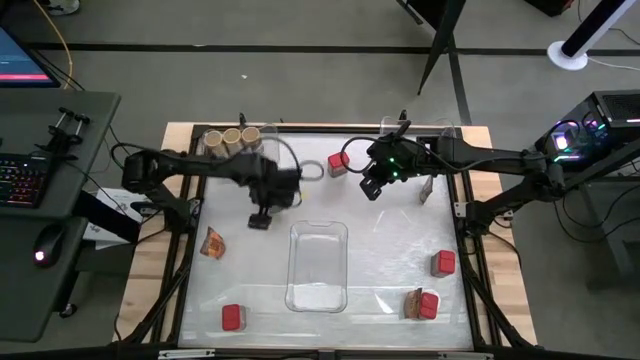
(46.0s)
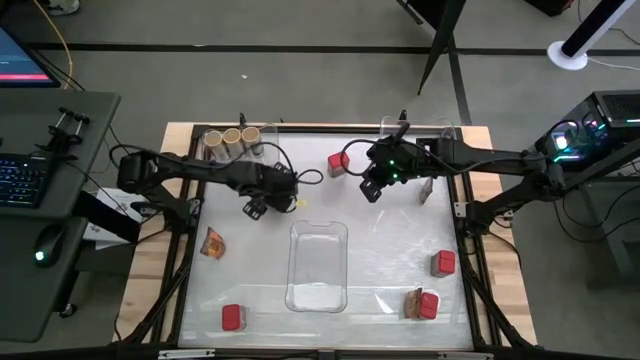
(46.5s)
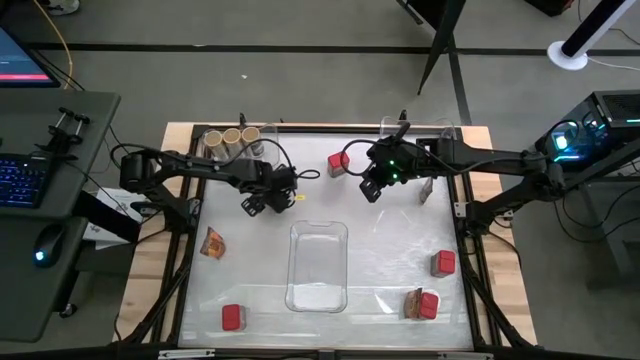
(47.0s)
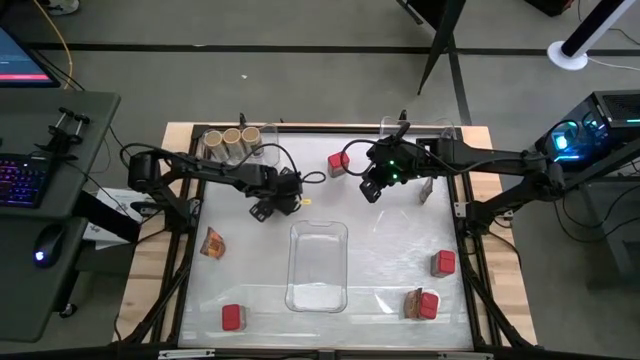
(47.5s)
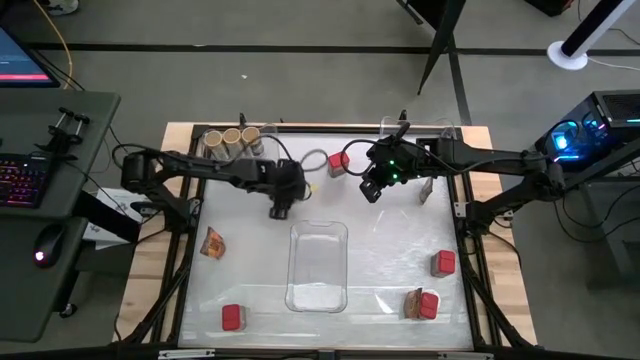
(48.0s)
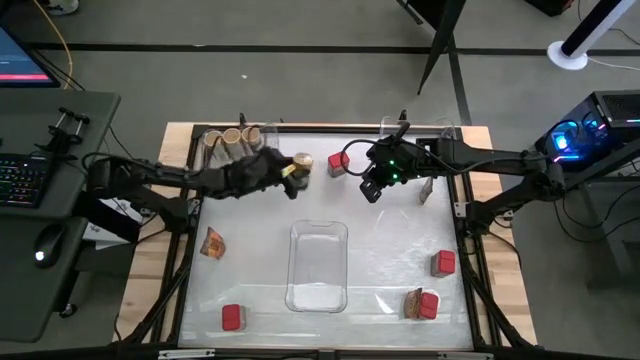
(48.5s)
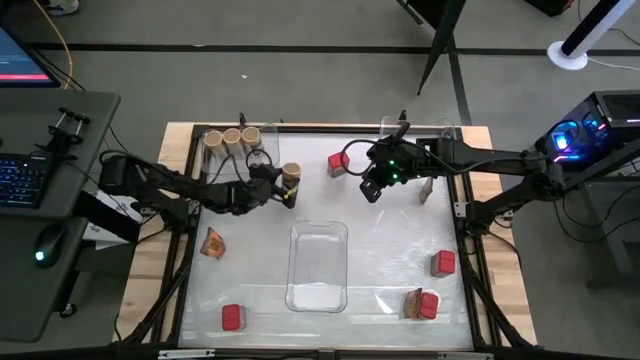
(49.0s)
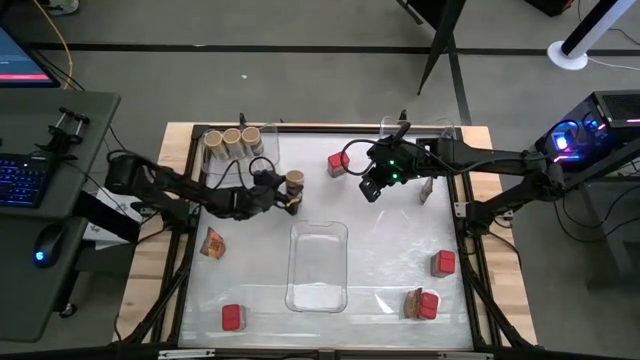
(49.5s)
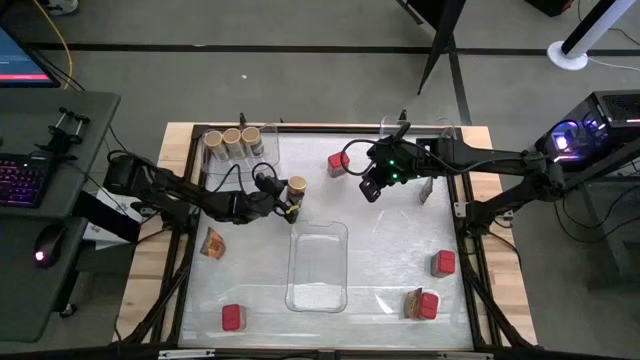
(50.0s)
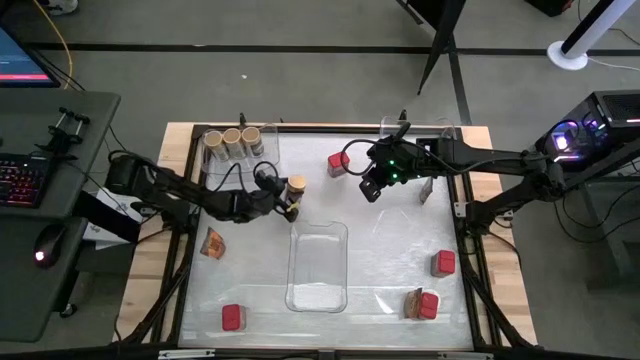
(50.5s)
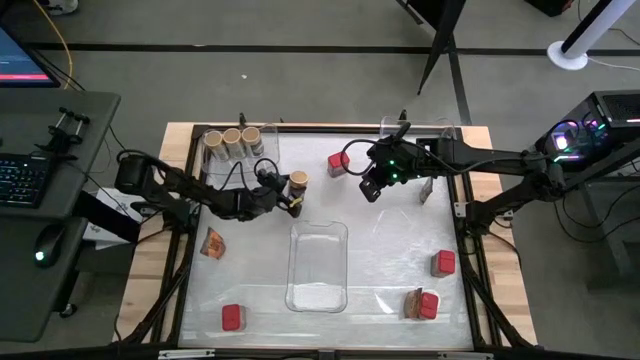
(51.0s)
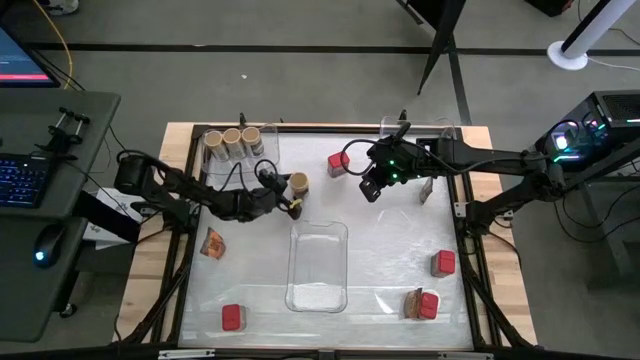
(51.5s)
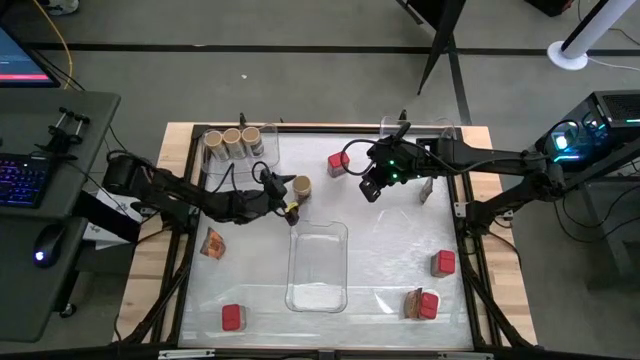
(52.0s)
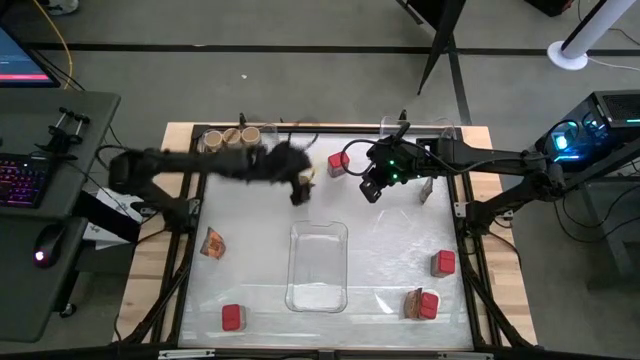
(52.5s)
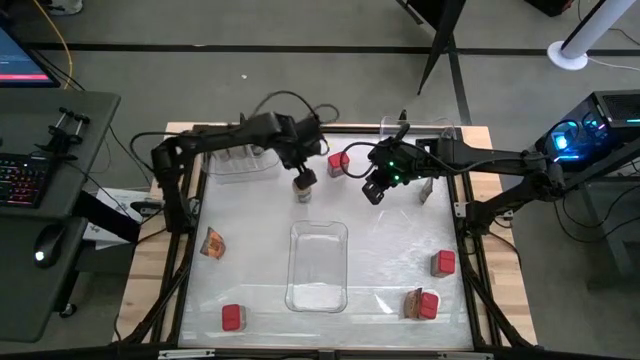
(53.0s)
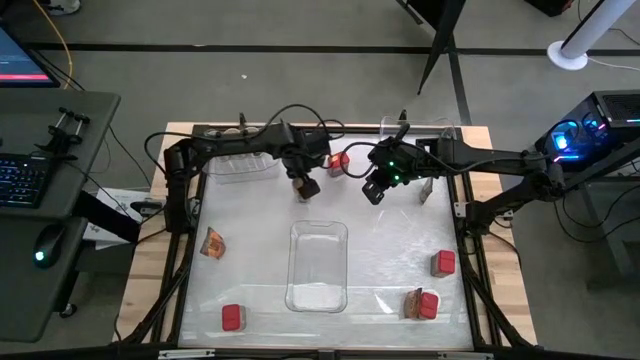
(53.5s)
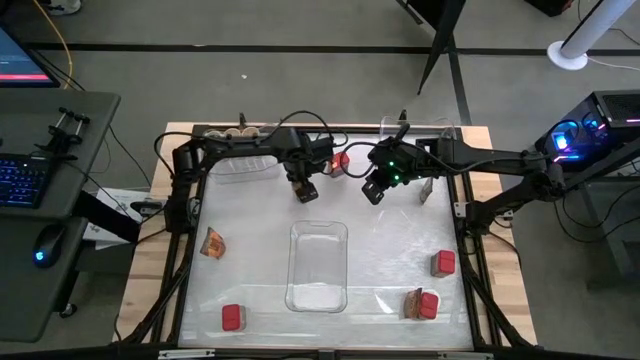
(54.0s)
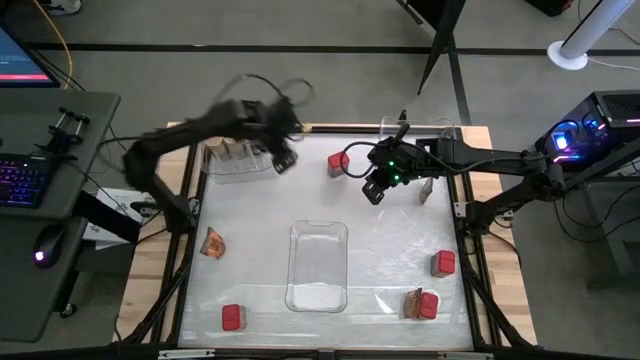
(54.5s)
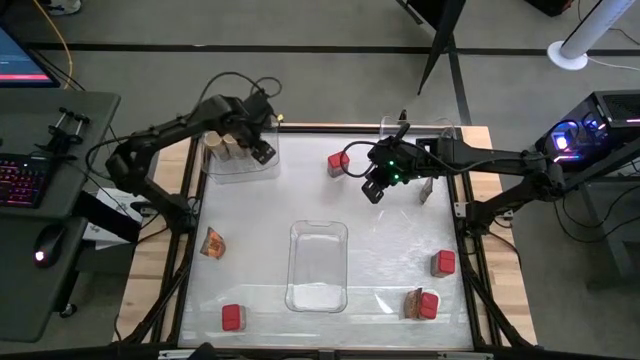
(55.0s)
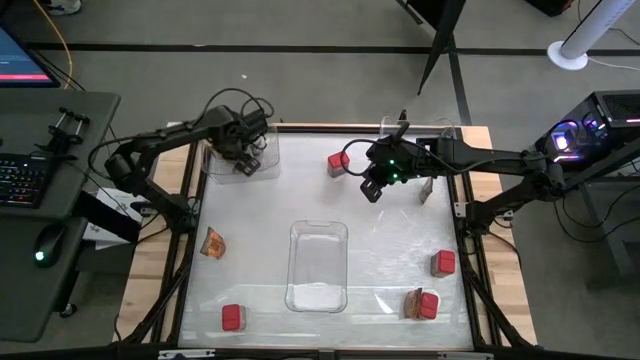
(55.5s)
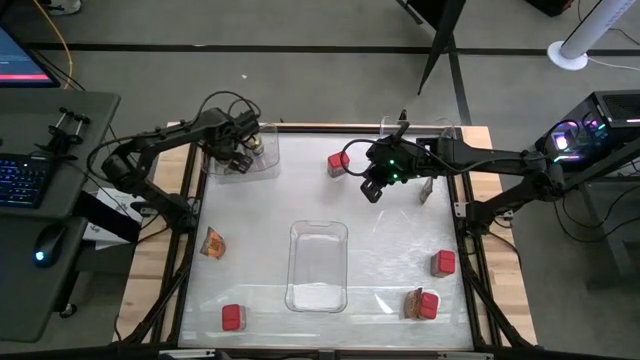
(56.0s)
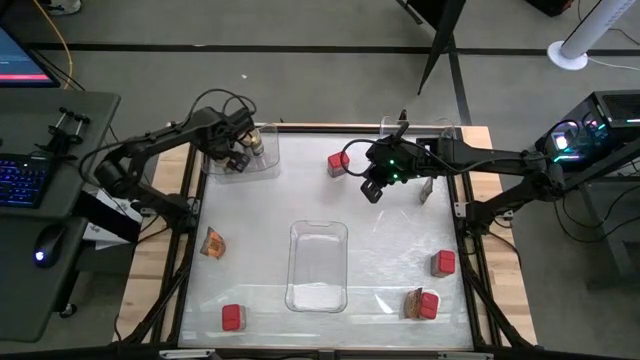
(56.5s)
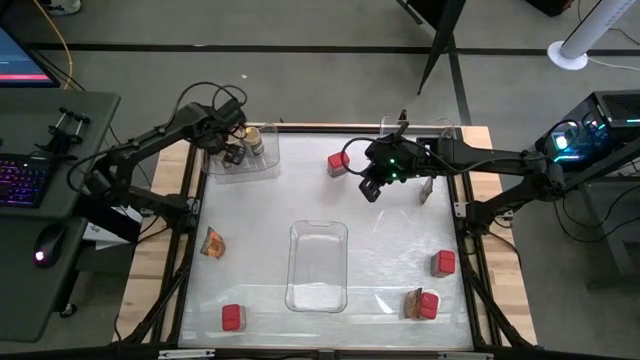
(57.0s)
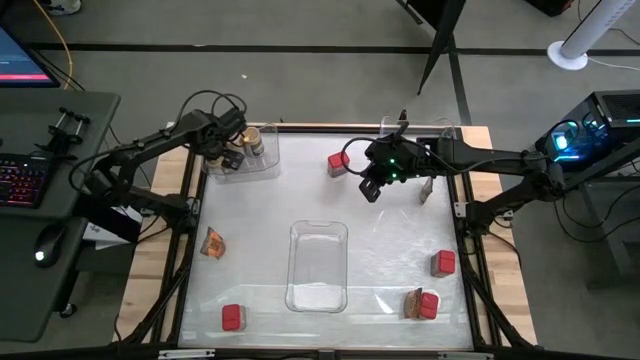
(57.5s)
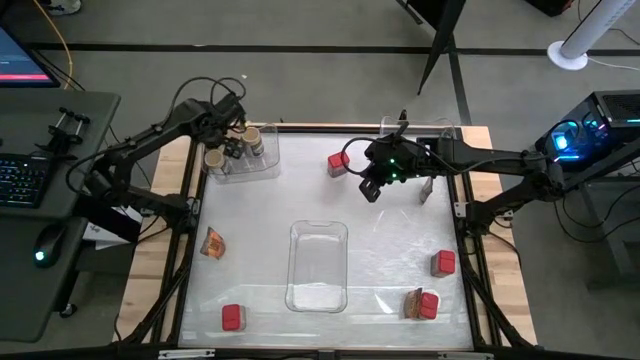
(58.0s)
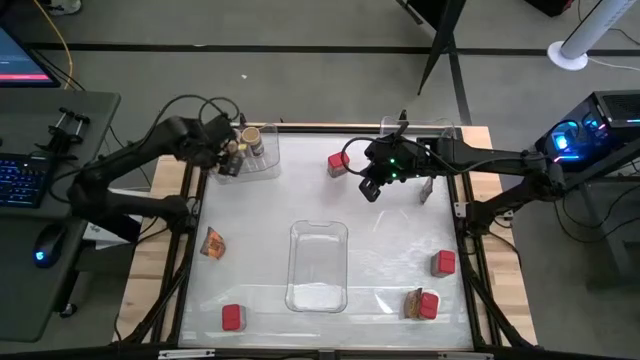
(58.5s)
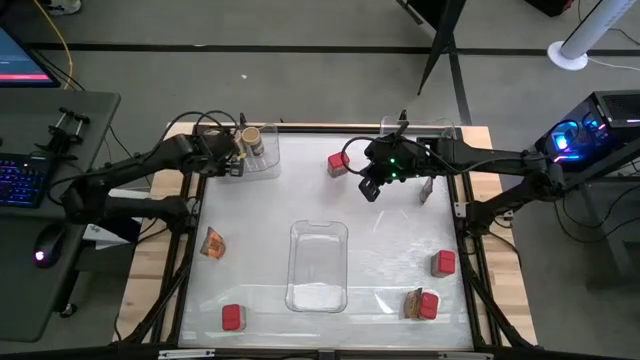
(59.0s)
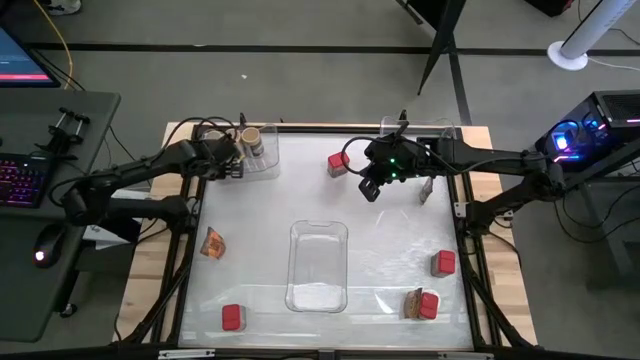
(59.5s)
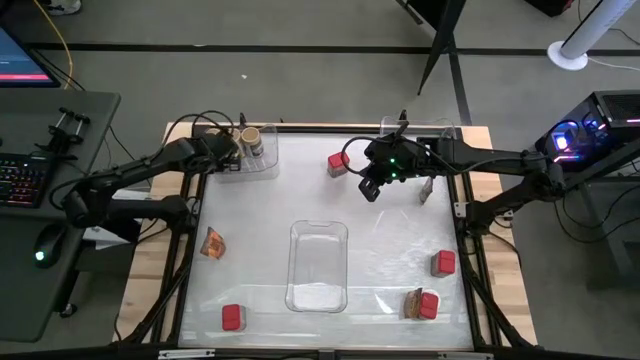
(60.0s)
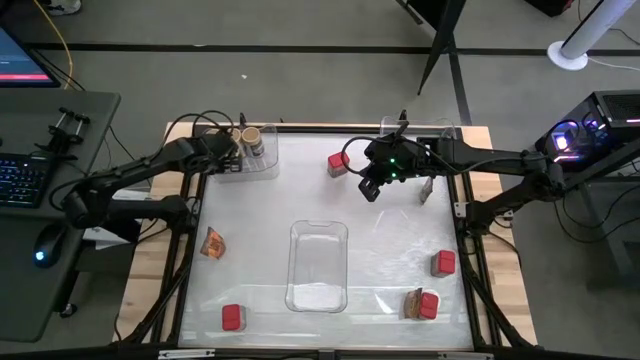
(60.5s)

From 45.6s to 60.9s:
Task: Sort spices by type
Put the gold seasoning bottle into the top left transparent bin

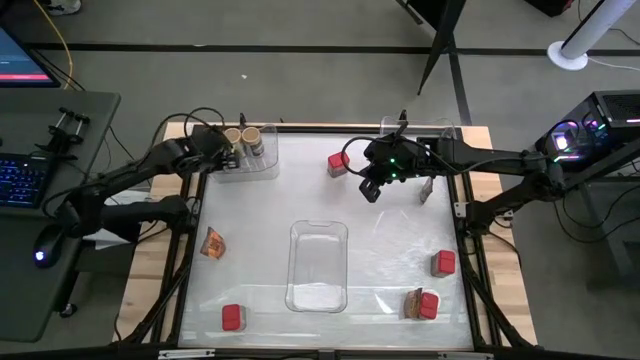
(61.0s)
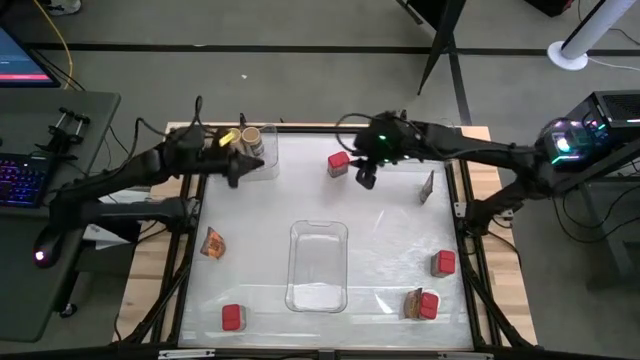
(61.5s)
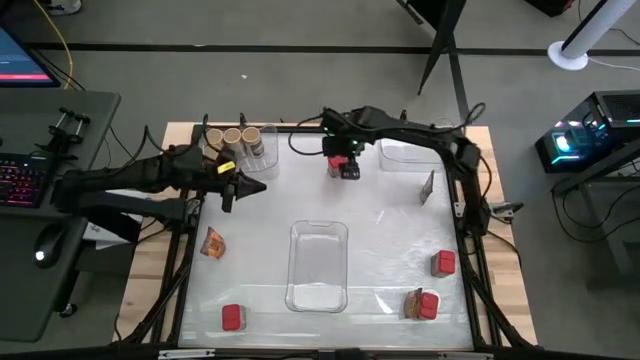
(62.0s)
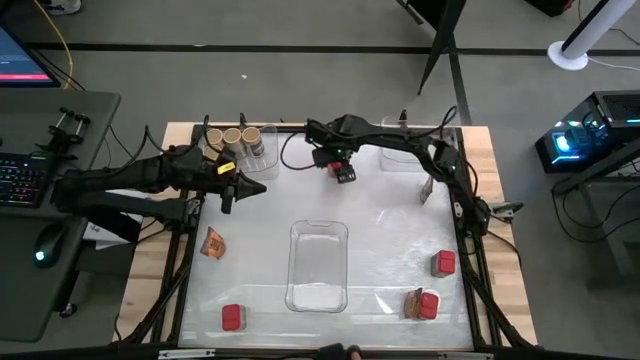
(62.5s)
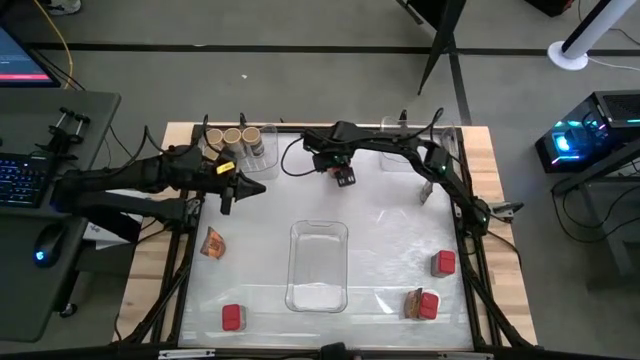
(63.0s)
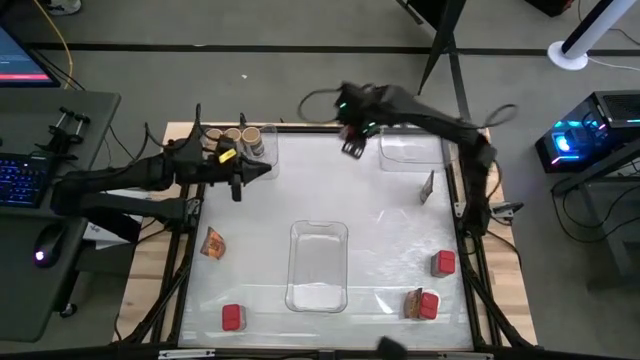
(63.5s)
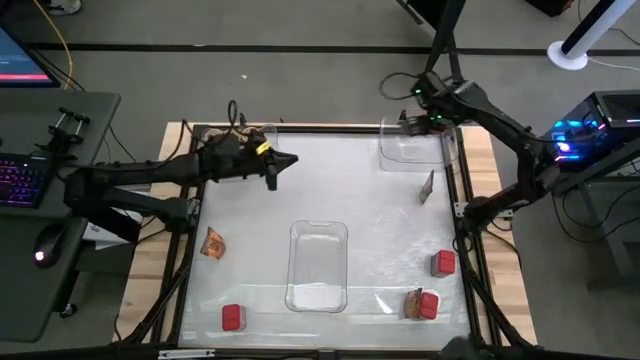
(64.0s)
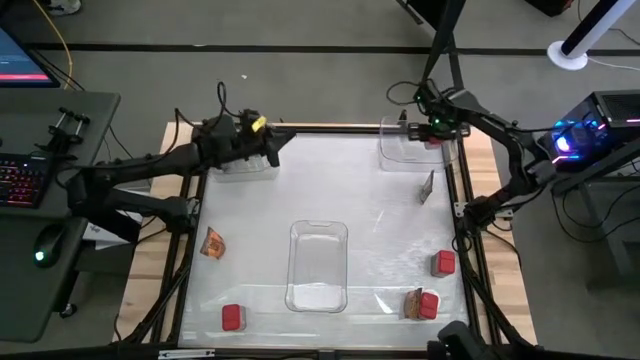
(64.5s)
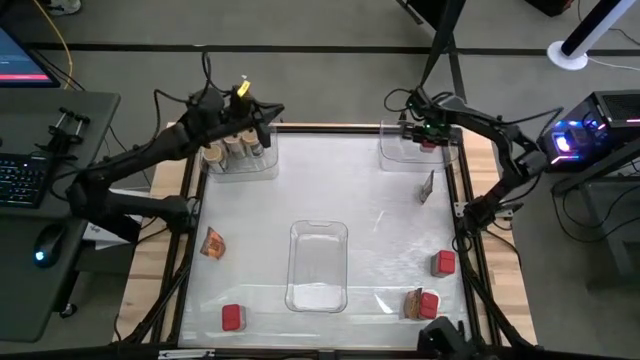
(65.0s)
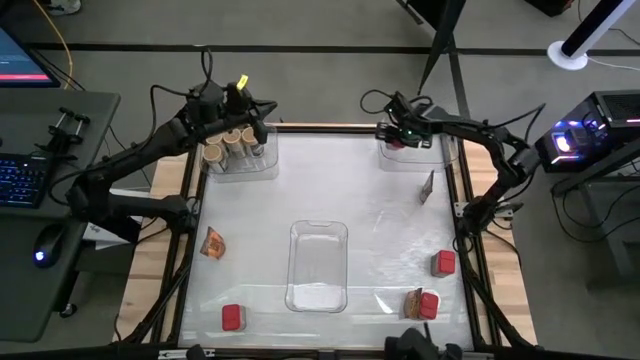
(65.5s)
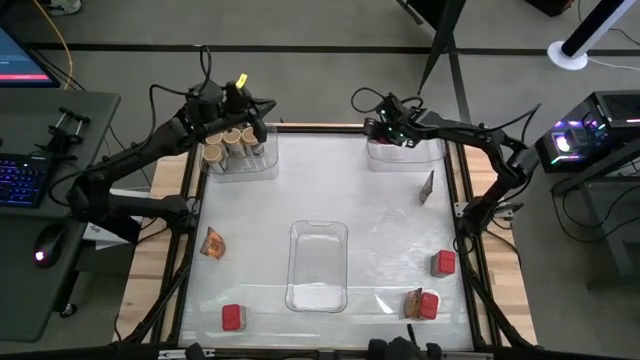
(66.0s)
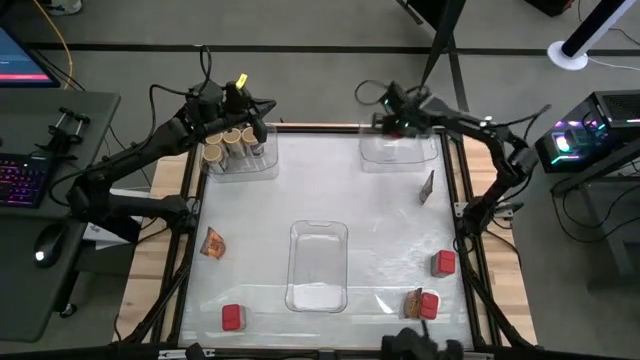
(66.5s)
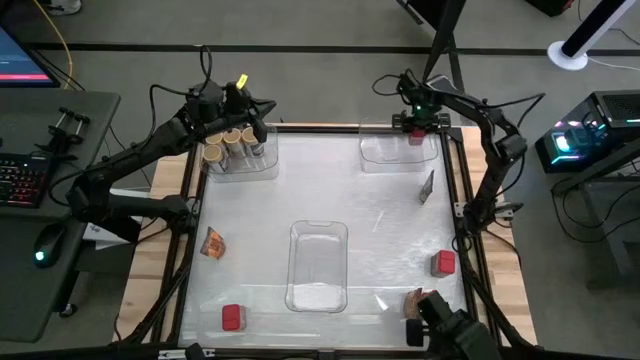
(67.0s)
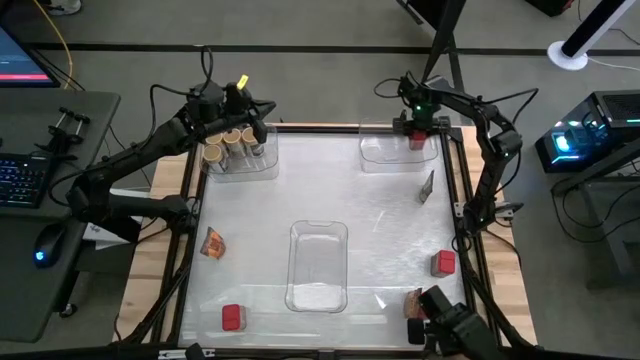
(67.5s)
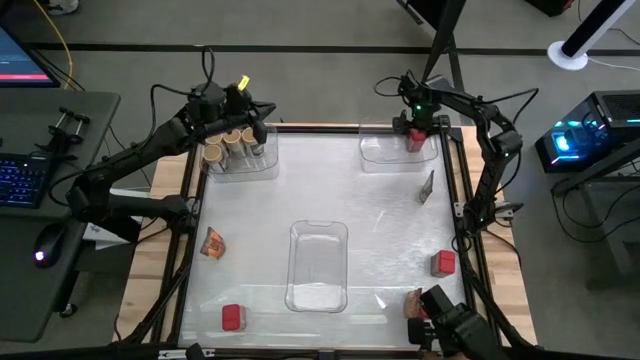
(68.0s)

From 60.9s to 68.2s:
Put the top red seasoning can into the top right transparent bin
